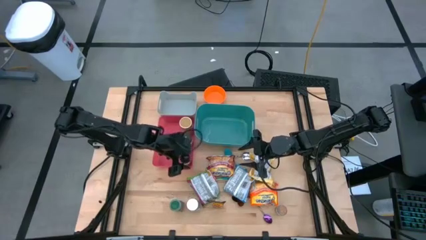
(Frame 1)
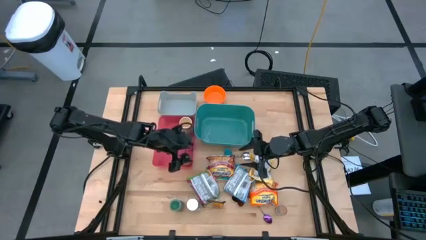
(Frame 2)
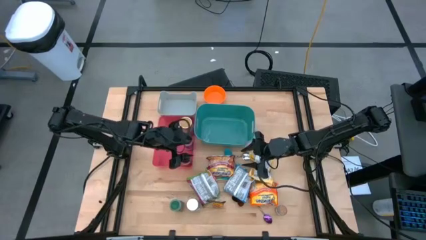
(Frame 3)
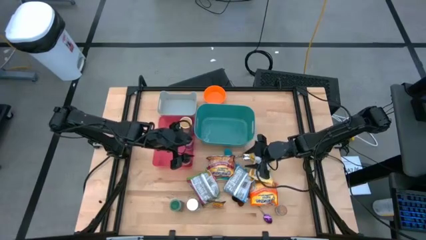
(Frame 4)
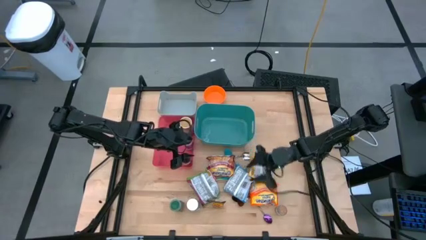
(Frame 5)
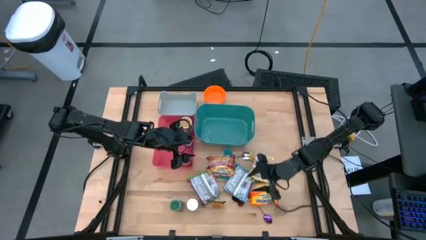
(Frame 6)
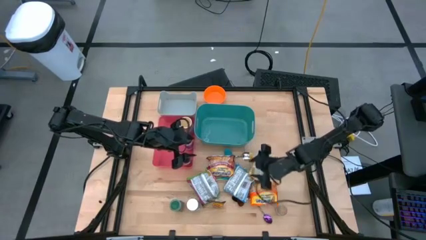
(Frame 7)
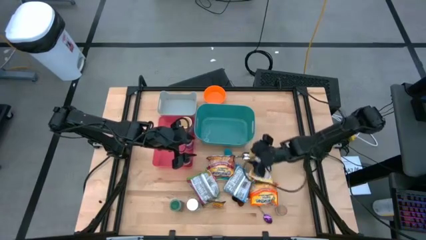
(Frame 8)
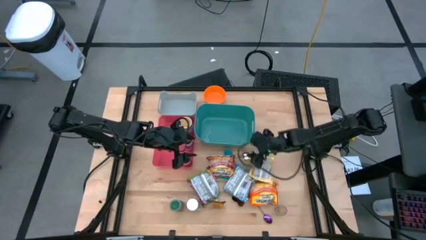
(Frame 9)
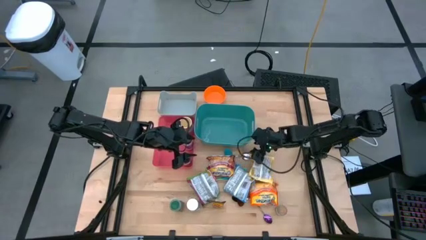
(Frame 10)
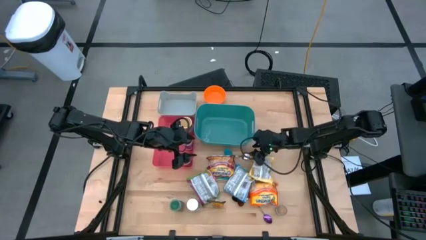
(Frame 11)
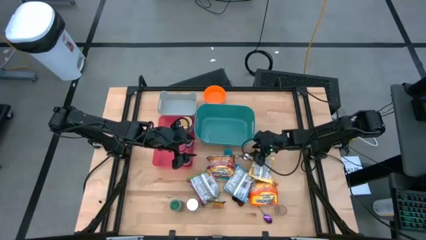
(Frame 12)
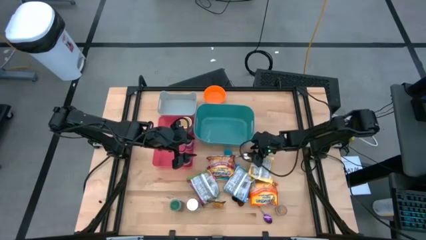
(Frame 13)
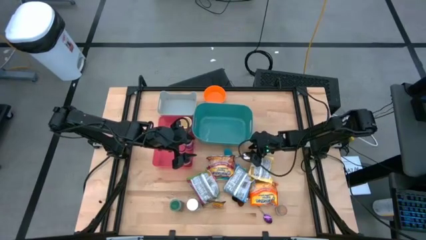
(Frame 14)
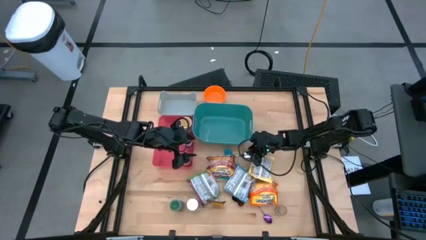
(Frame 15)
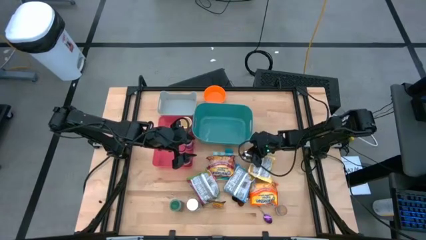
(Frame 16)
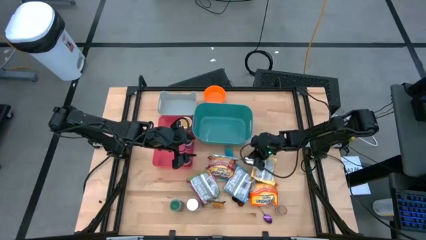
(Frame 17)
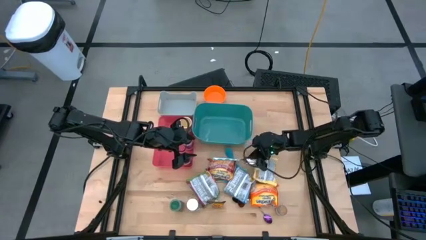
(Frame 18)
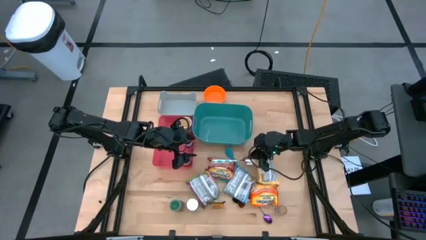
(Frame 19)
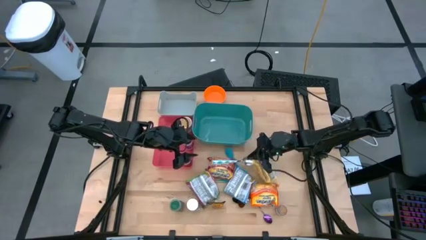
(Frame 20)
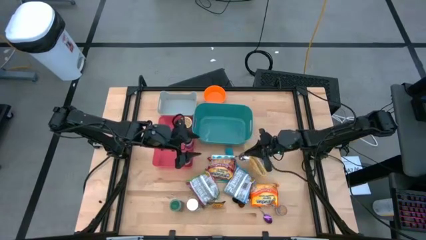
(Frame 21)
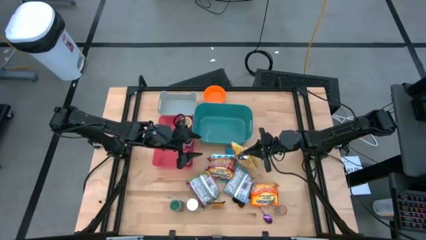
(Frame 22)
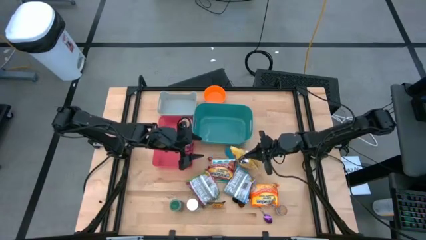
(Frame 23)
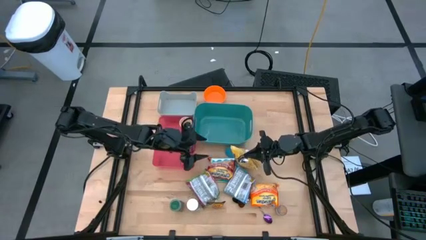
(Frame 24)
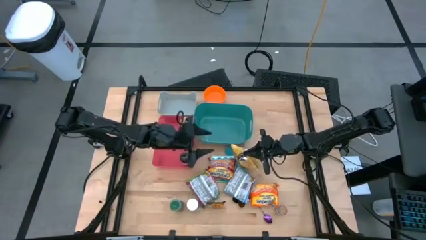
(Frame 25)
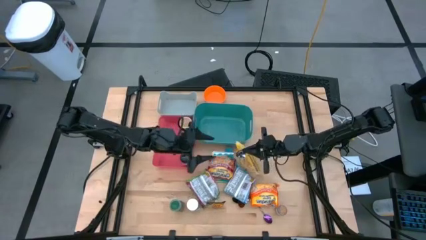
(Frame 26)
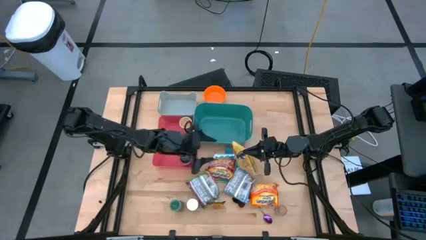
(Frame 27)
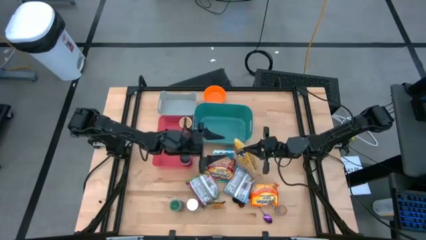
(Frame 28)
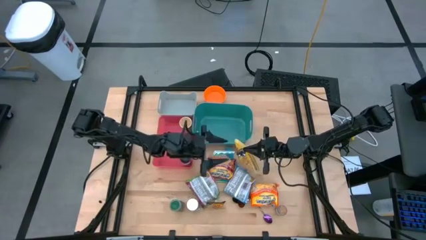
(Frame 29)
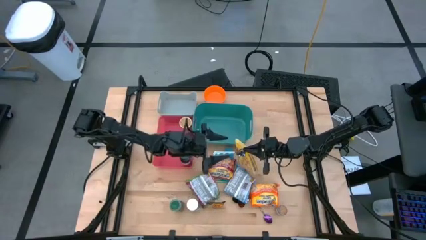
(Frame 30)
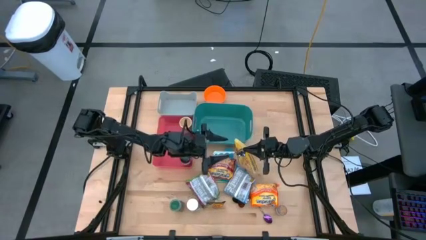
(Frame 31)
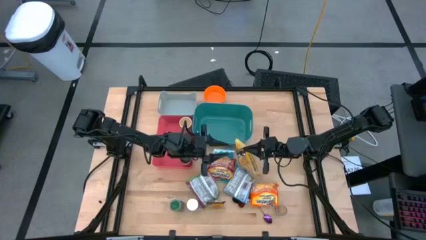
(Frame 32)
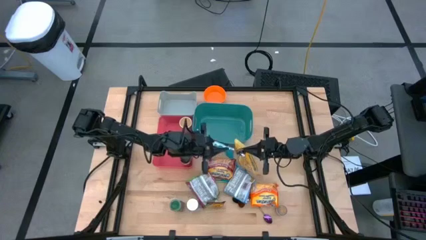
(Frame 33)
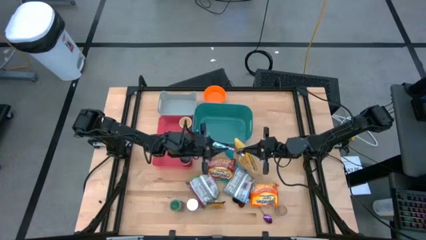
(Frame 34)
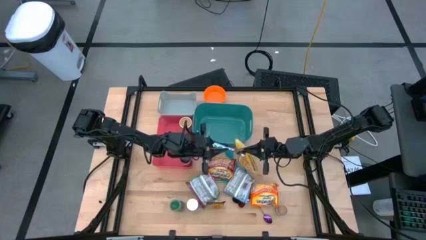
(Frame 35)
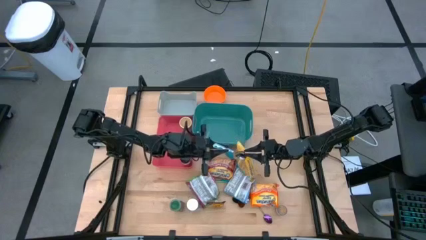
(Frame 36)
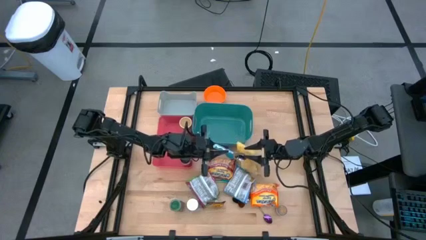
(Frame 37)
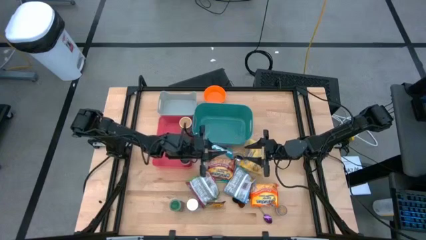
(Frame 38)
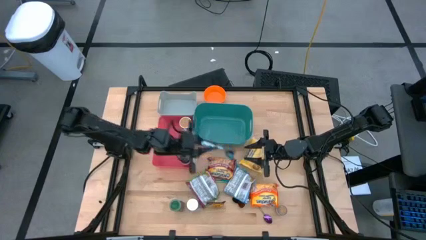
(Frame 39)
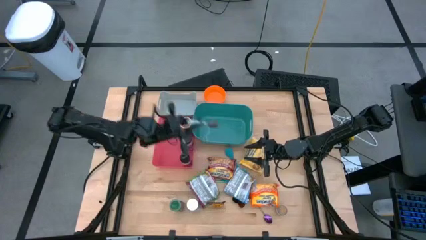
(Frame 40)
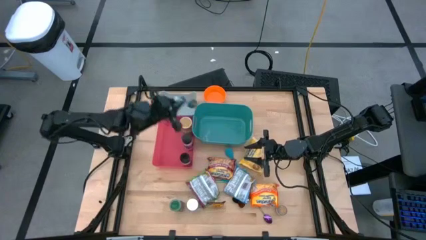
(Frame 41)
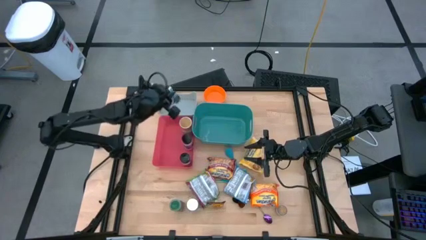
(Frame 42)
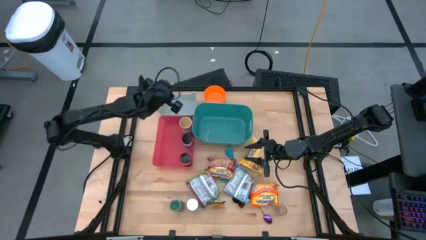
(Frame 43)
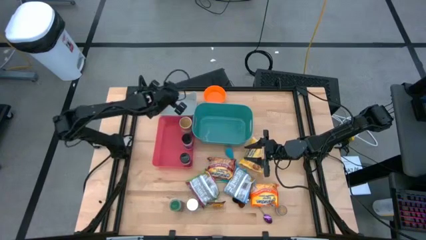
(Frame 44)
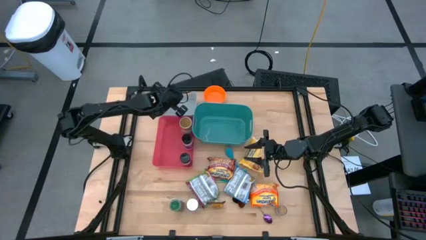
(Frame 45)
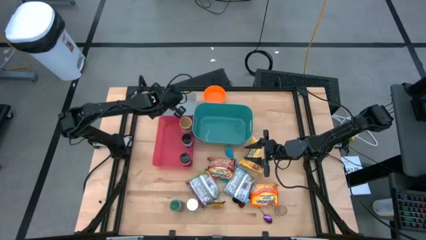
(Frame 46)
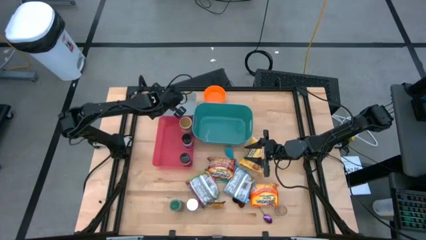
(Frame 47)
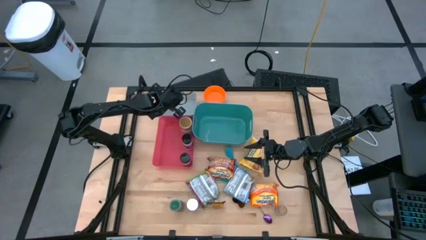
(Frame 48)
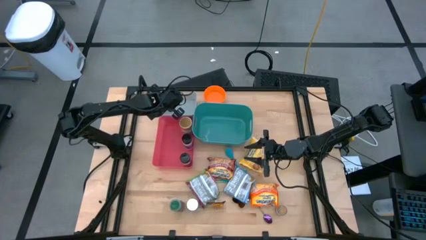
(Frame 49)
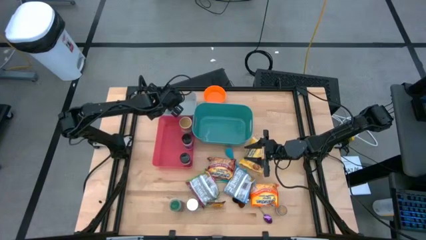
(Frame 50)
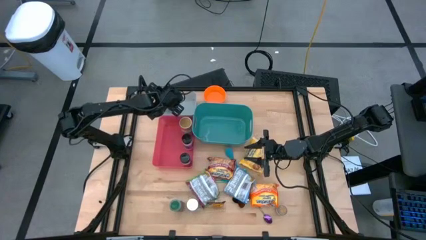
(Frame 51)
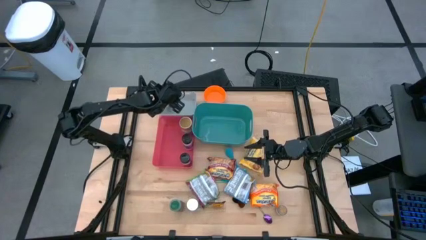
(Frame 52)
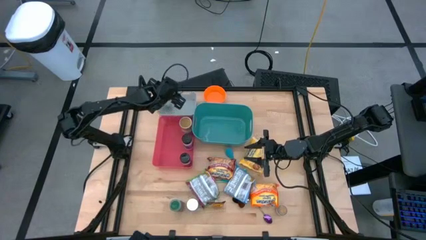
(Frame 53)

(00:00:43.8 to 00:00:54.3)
Task: Pick & Place Food Item
Put the blue patterned spoon into the gray bin

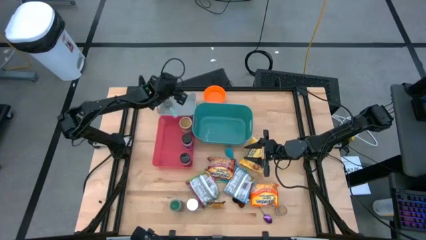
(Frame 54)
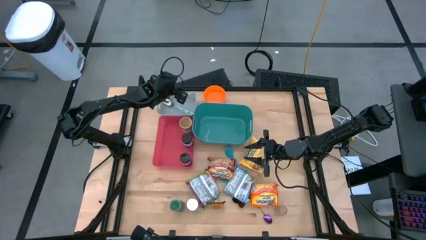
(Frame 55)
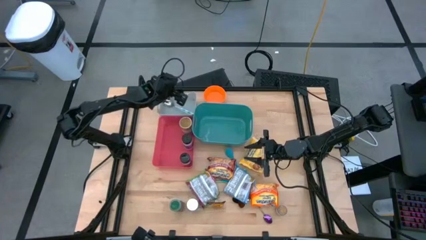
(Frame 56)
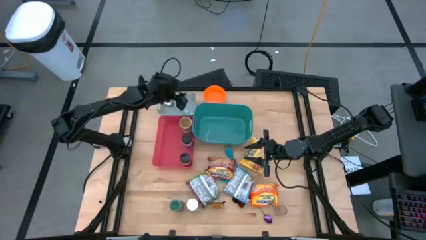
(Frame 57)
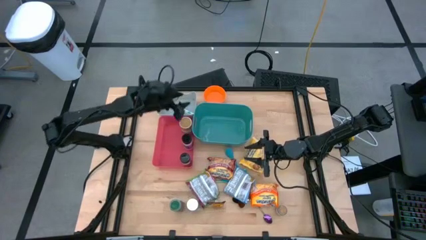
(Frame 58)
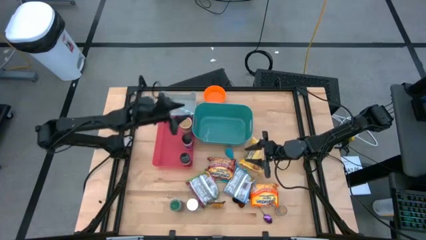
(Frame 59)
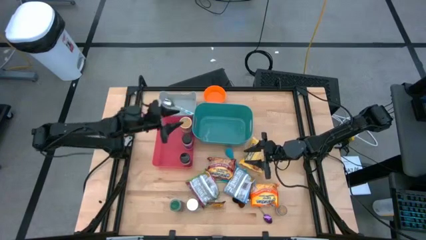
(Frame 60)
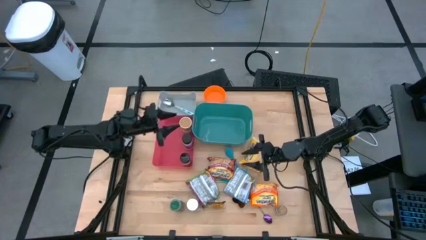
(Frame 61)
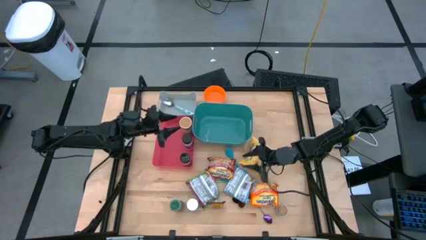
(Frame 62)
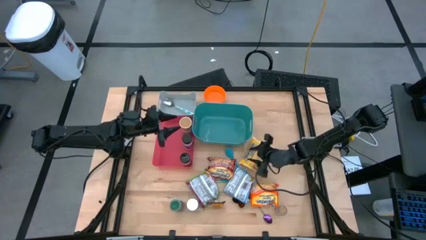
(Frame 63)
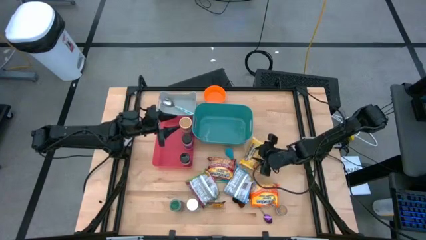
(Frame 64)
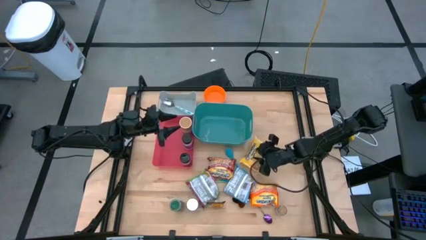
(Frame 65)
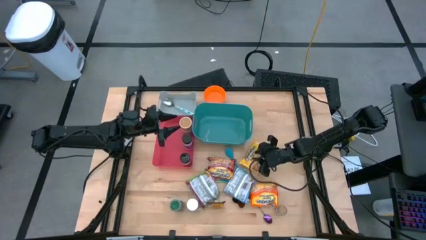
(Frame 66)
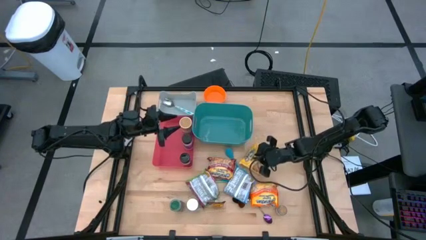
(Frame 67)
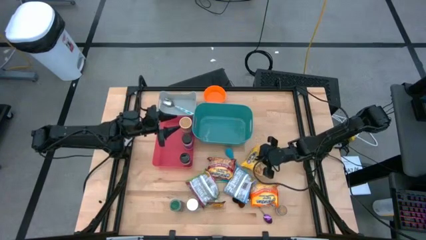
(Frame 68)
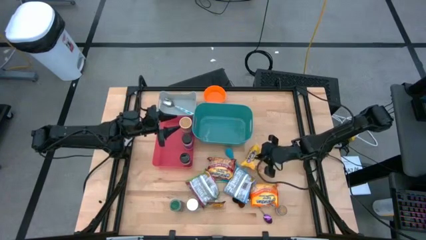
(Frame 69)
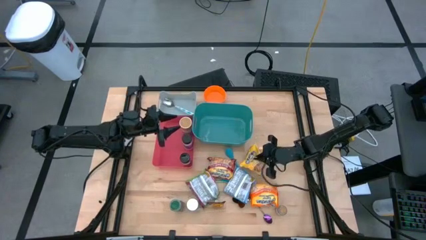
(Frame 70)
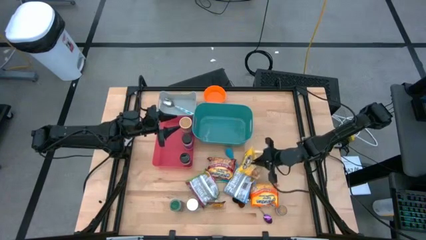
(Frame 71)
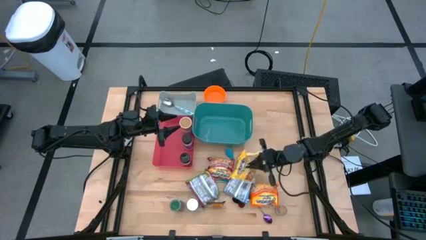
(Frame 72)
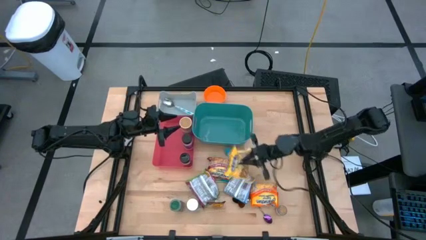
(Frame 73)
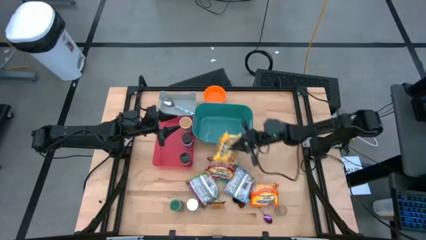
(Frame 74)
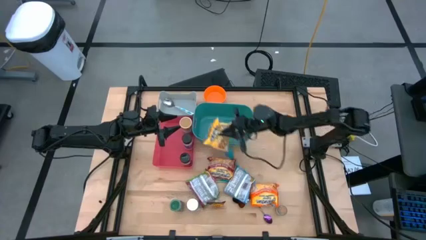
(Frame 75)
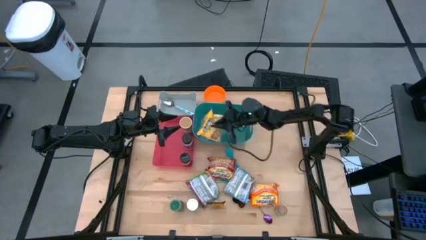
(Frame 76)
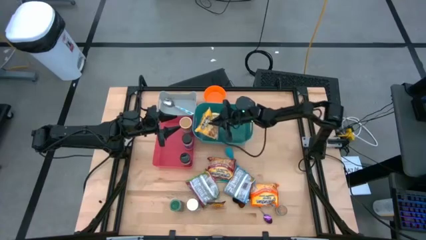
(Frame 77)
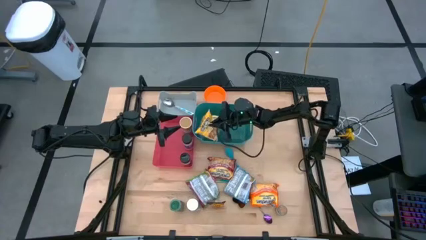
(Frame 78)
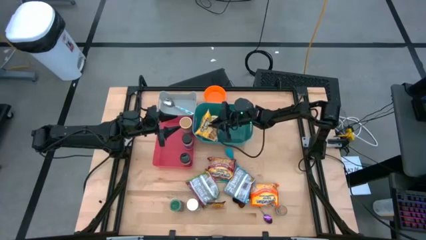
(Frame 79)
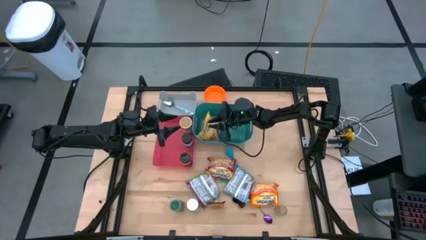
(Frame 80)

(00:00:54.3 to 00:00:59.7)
Put the yellow noodle pack into the green bin

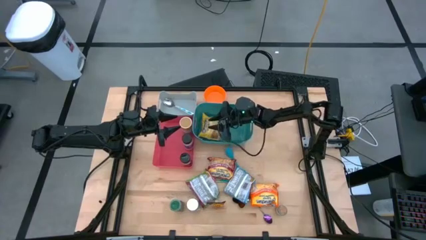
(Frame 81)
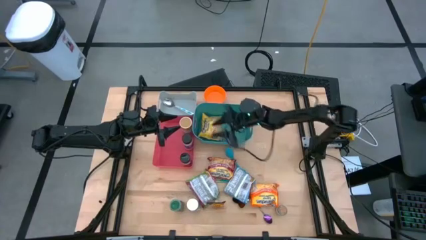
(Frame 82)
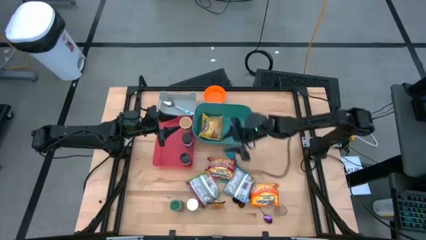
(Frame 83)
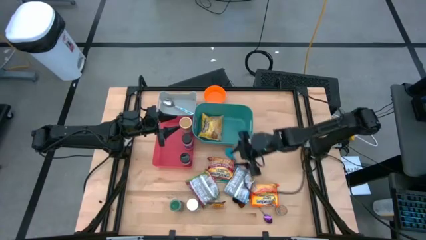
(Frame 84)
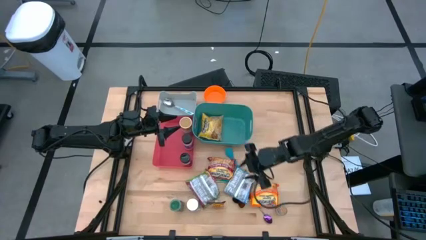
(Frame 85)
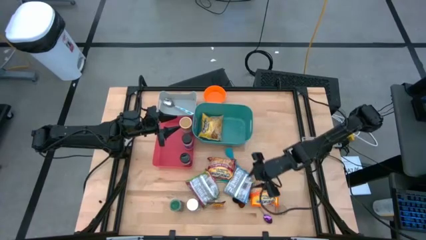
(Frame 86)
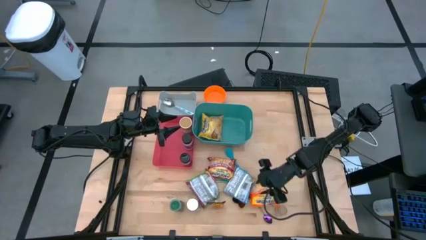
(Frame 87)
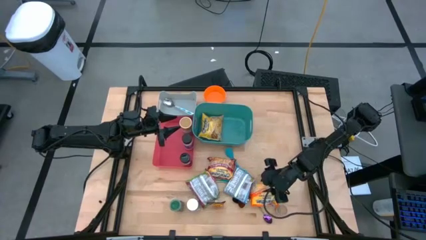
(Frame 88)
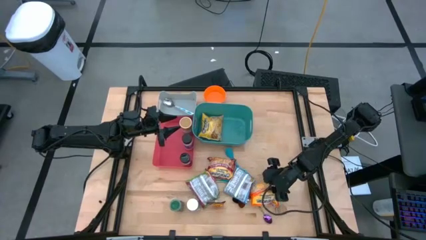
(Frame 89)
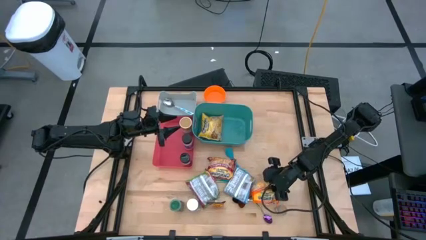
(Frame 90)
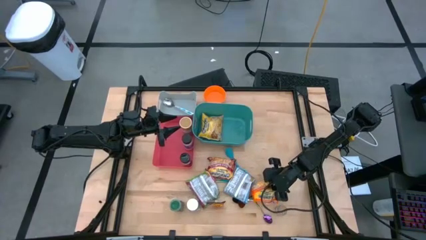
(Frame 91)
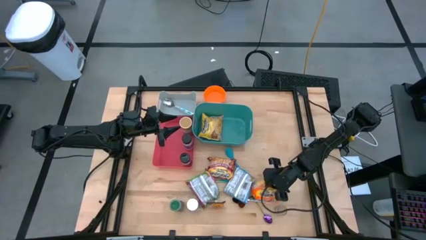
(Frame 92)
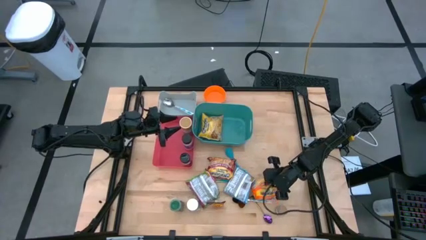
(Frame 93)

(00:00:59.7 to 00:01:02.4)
Put the orange noodle pack into the green bin
